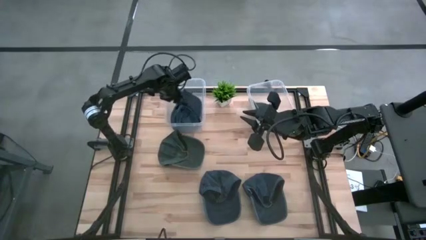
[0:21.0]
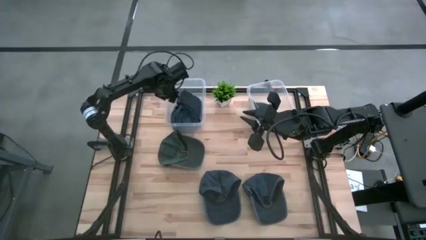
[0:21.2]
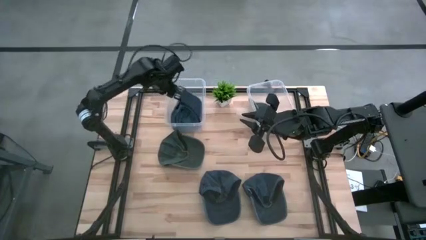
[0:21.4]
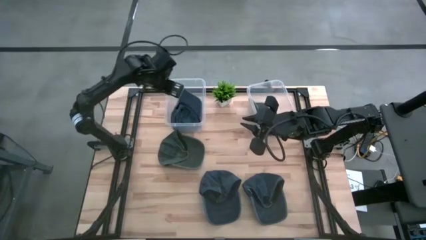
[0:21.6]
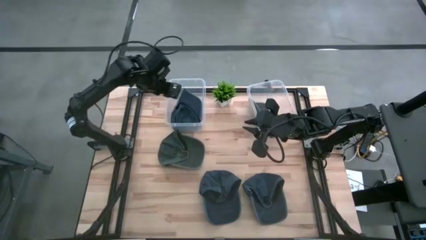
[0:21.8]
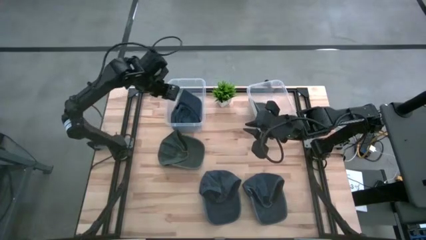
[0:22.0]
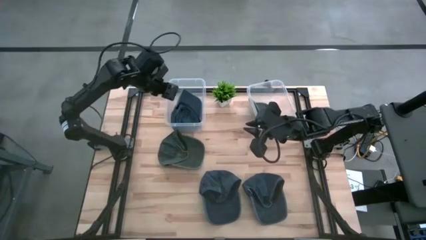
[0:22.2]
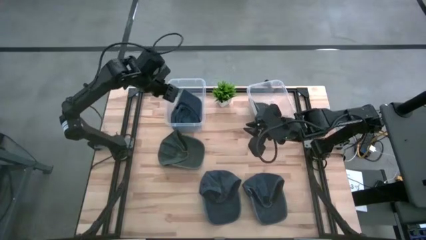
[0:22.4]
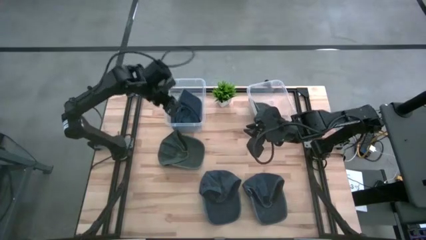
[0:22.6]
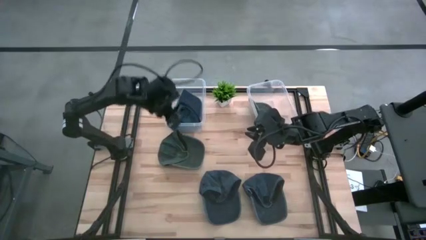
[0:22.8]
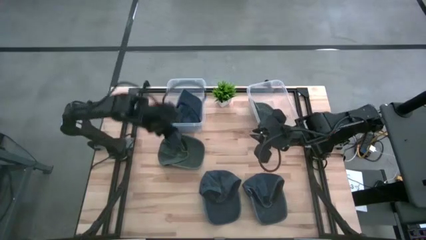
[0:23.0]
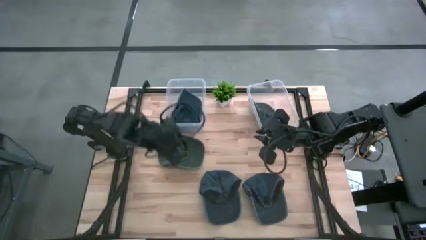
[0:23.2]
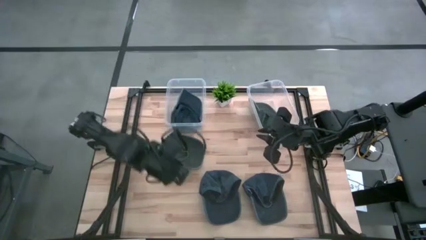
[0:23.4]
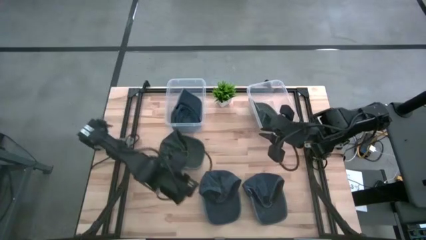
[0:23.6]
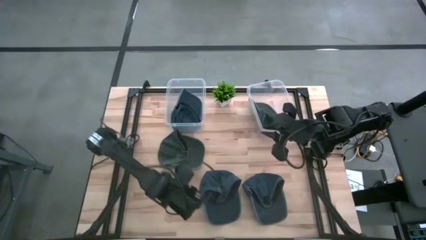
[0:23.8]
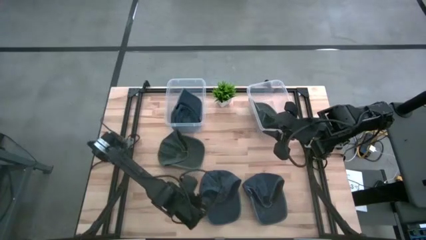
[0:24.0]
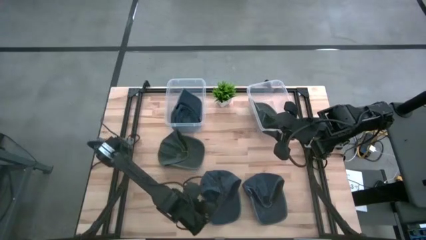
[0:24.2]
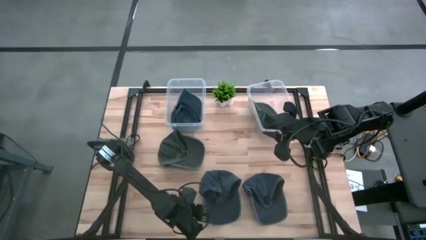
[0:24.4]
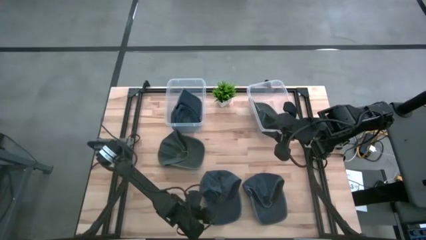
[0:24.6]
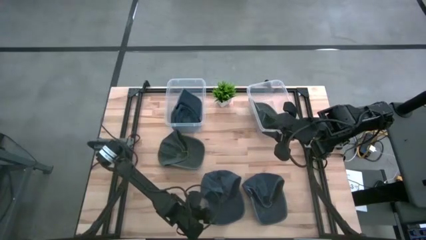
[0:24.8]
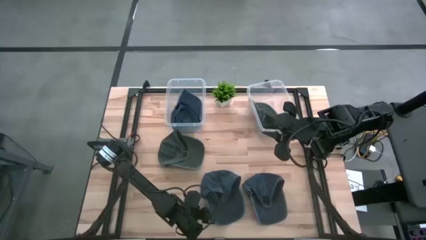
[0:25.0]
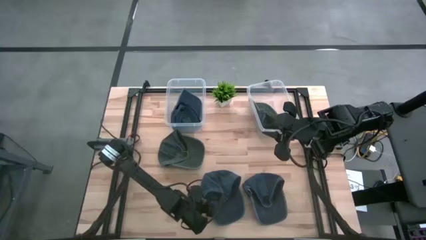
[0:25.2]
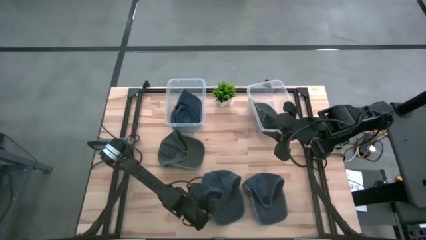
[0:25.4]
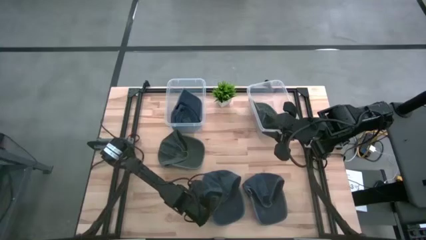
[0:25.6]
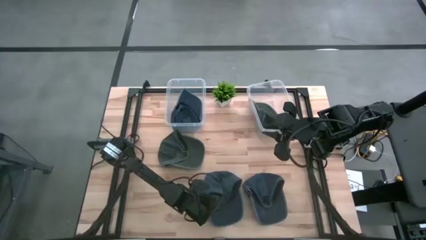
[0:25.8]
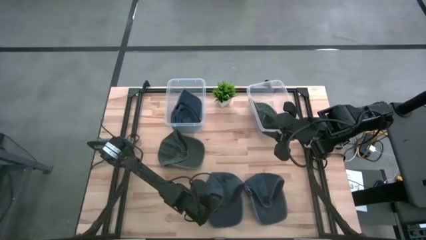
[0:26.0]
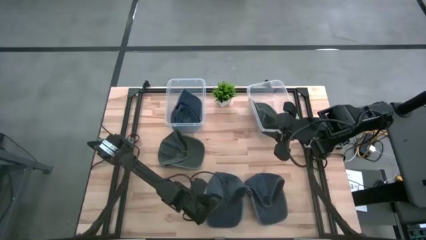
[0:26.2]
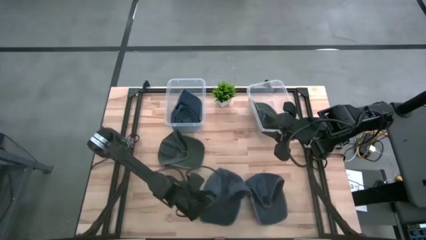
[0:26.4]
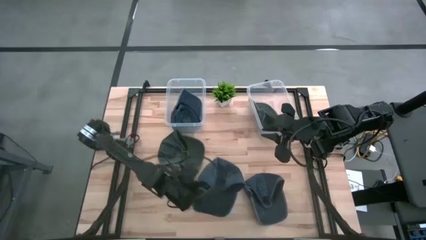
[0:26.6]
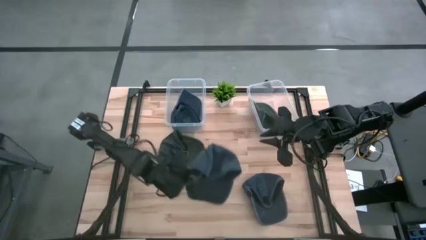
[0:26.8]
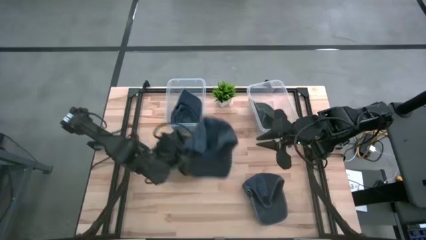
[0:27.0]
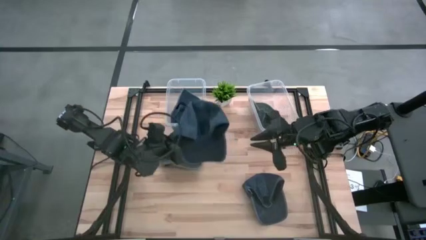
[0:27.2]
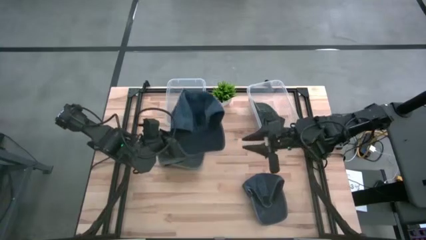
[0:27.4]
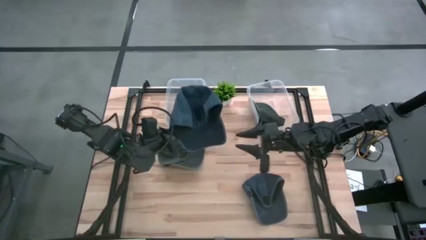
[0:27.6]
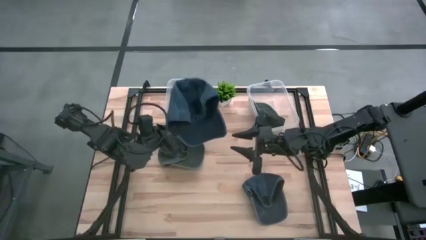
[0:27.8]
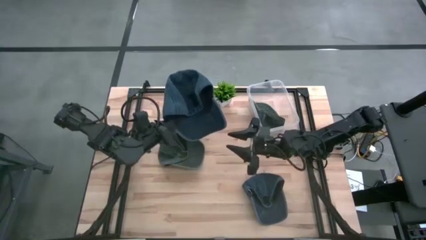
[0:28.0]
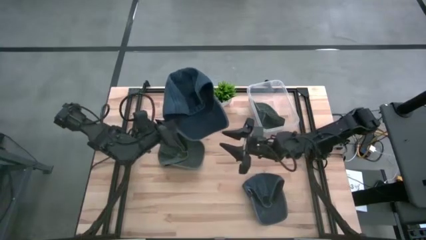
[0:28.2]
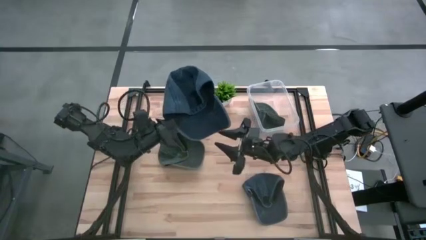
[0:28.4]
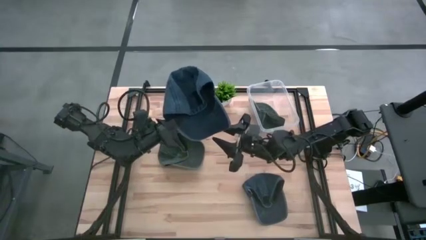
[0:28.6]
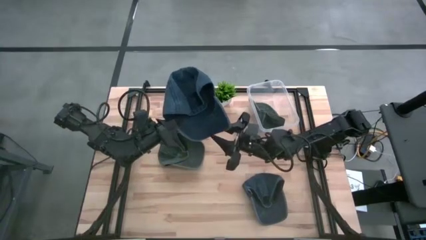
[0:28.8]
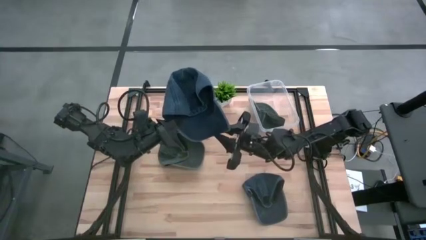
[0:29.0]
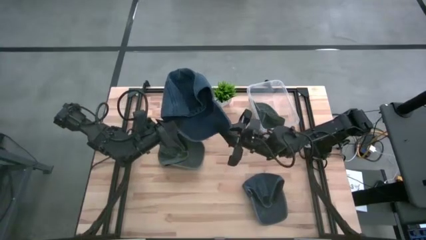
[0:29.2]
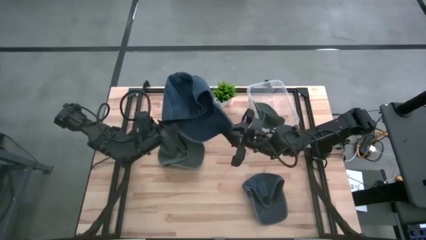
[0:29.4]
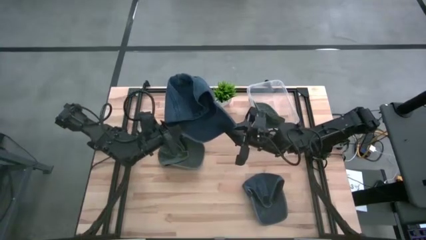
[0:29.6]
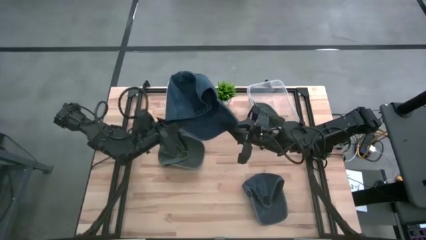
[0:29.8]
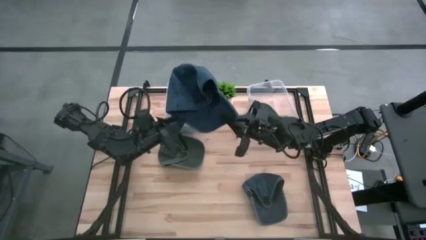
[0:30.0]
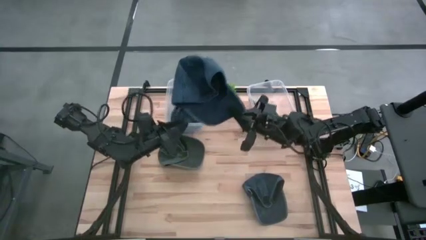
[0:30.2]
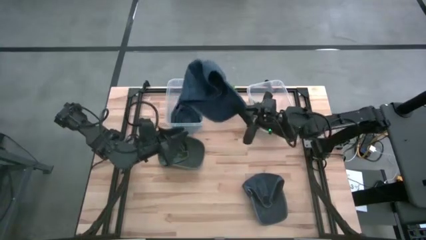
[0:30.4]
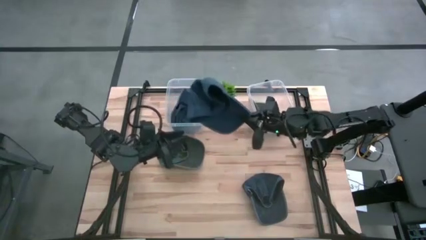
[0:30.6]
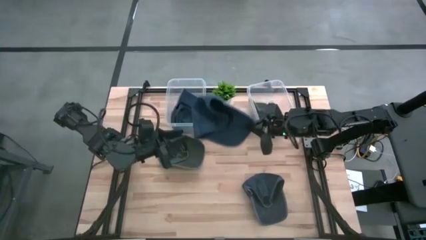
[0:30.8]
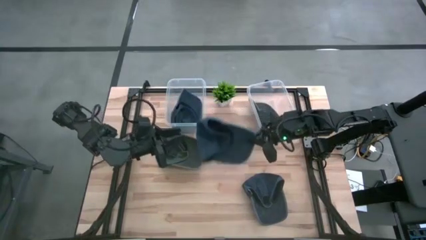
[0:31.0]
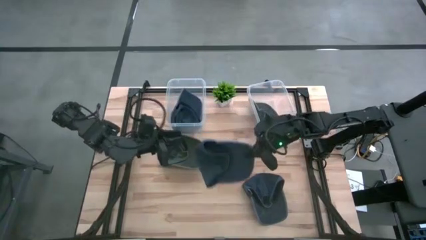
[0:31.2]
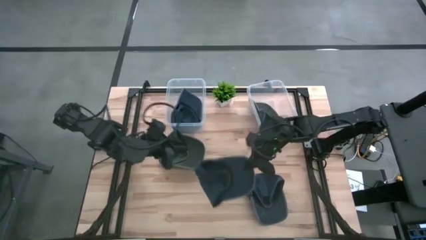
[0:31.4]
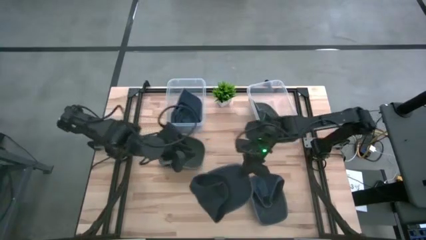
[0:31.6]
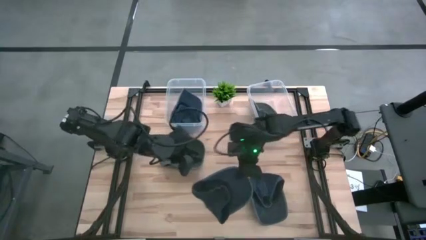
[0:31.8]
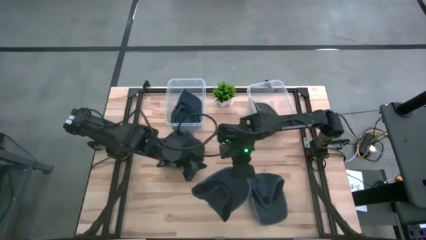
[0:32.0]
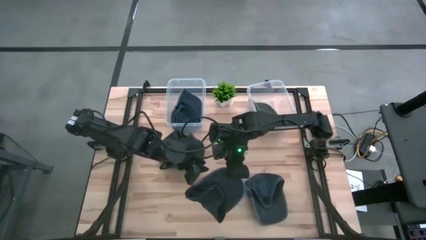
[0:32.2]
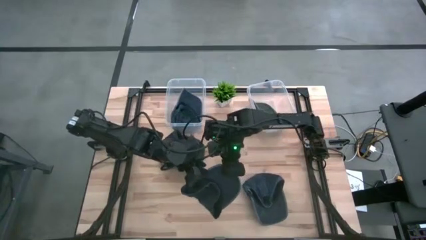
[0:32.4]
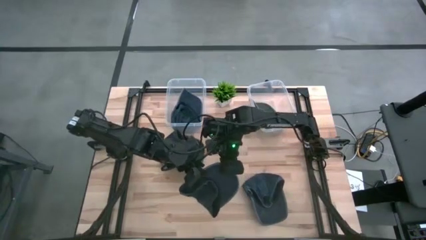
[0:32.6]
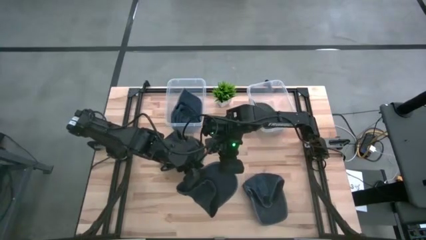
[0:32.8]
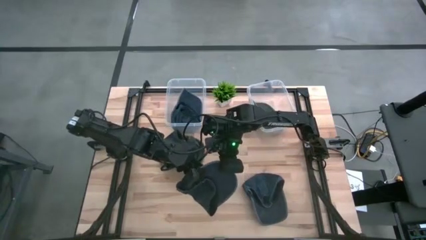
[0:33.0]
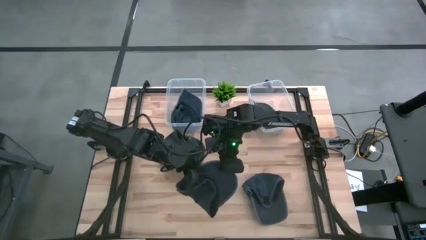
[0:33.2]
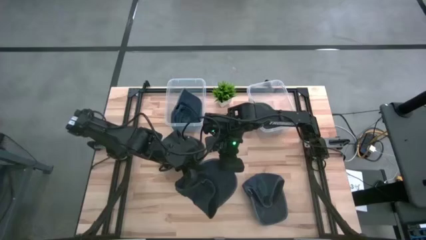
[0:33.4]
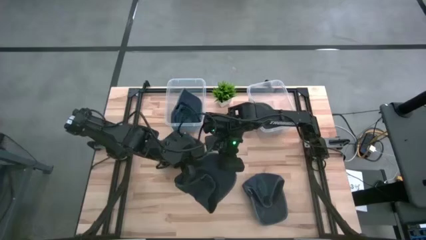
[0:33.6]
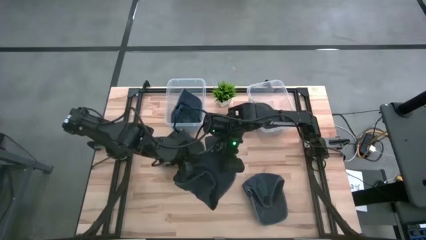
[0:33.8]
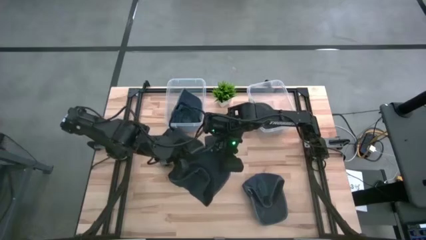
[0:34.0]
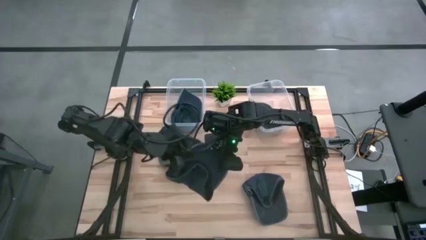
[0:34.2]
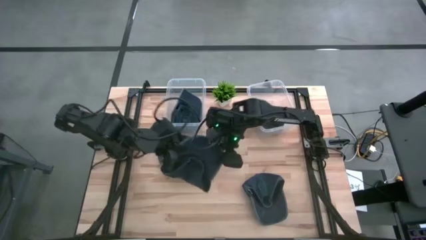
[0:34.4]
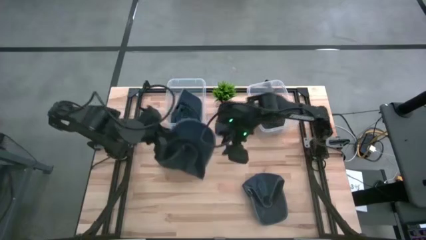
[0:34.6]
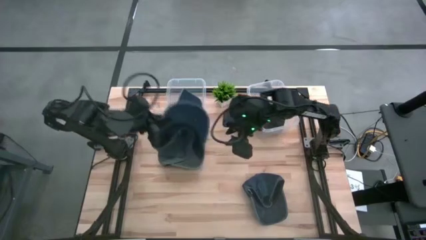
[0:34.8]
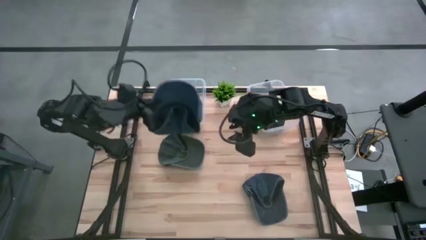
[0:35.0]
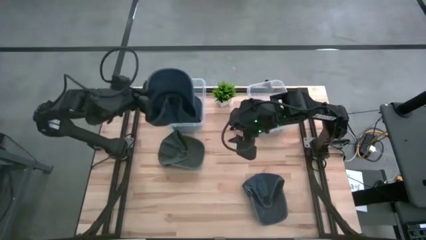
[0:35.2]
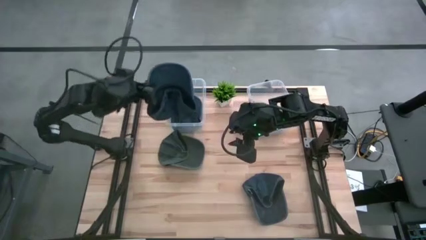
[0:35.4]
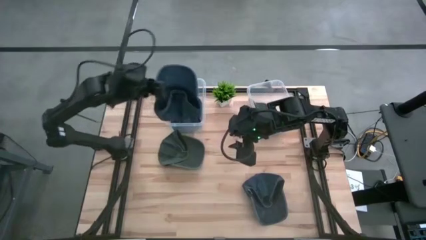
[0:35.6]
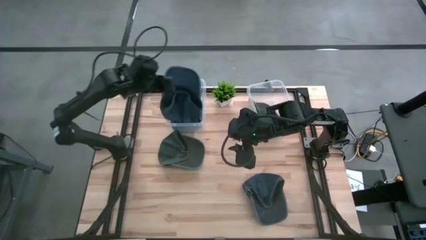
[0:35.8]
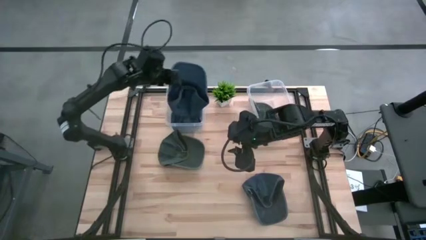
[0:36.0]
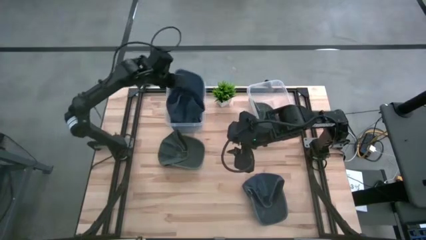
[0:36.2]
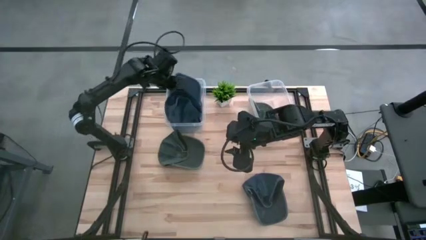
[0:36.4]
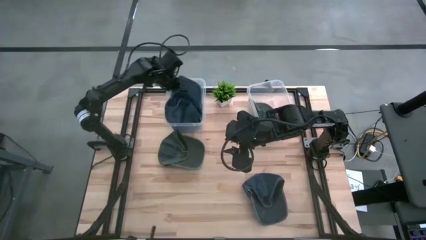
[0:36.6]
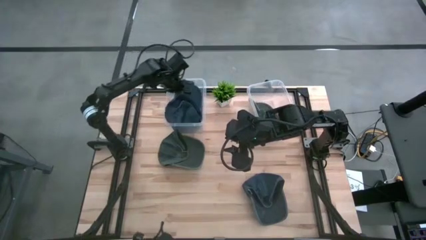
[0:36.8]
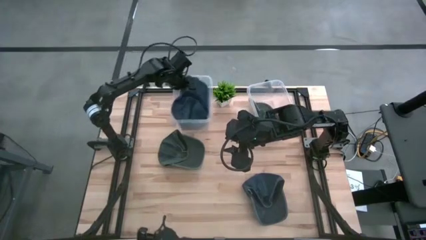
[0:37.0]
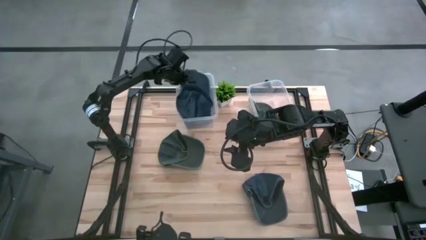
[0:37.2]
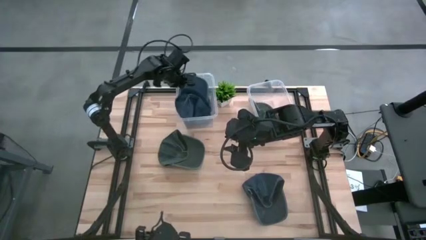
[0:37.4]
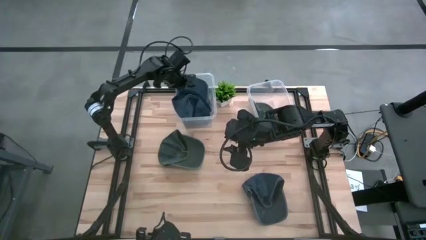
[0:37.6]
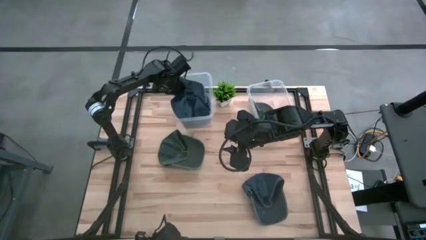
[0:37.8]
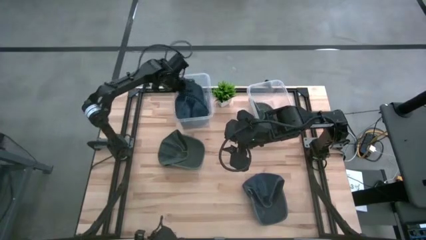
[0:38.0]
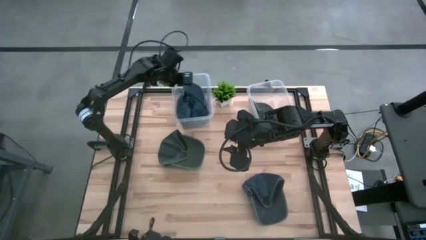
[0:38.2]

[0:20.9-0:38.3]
Task: Pick & Place hat
Put the left blue cap into the left transparent bin
